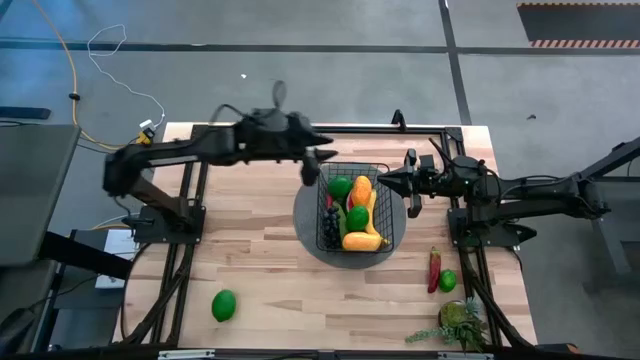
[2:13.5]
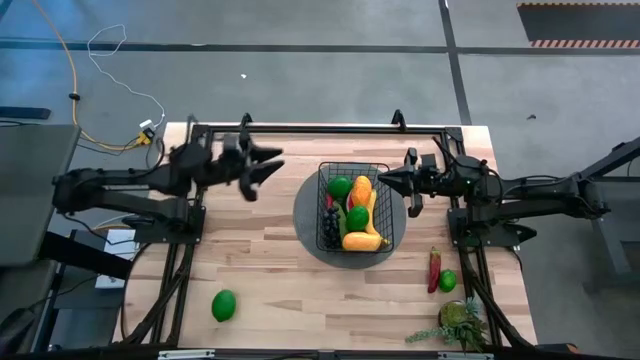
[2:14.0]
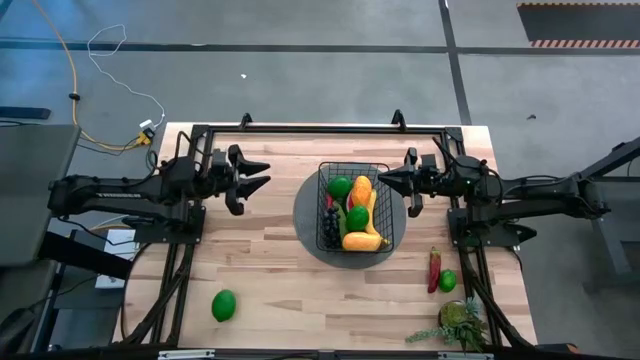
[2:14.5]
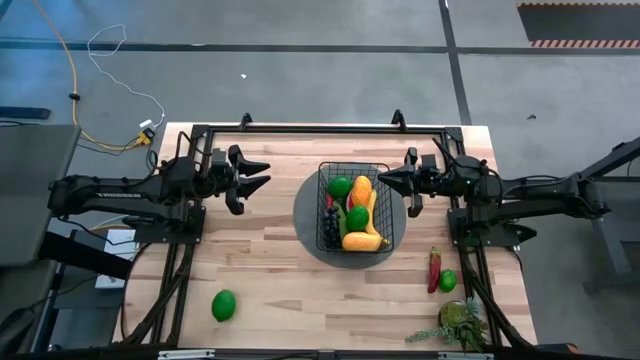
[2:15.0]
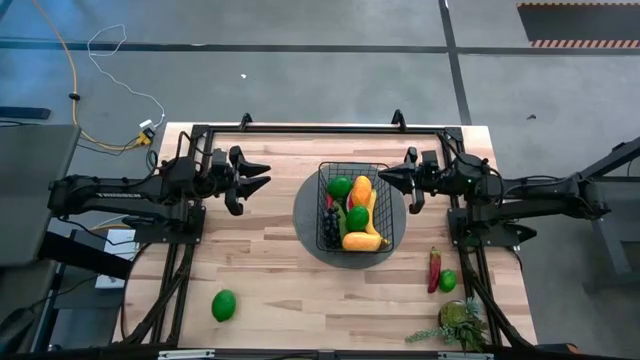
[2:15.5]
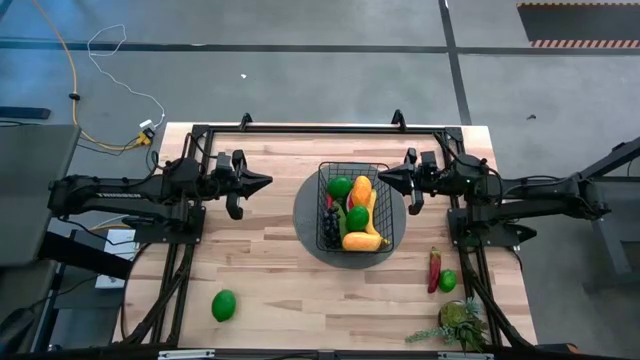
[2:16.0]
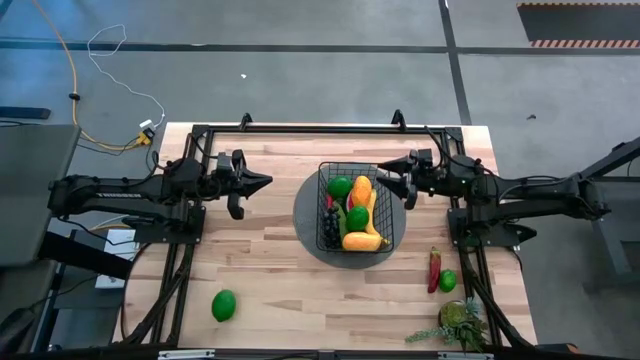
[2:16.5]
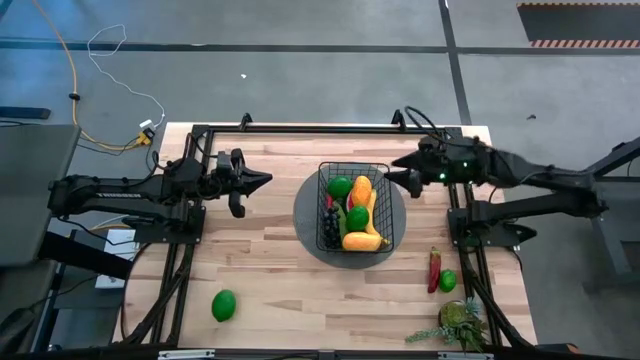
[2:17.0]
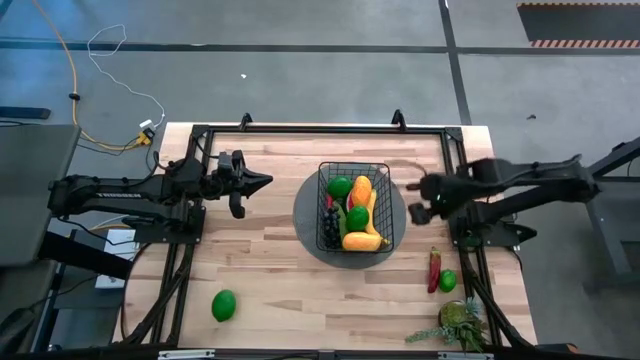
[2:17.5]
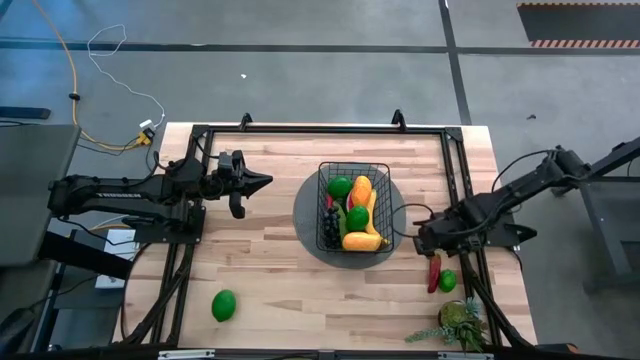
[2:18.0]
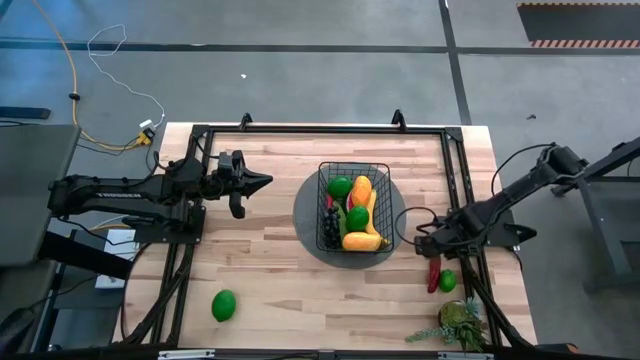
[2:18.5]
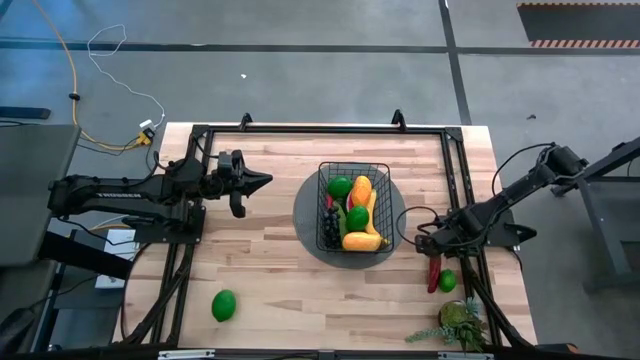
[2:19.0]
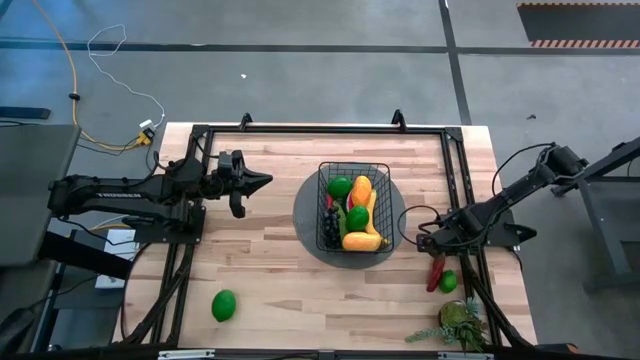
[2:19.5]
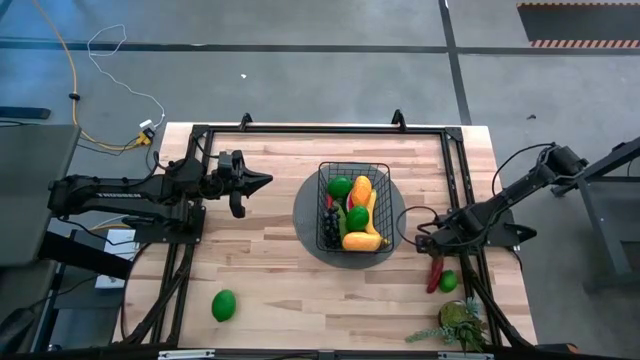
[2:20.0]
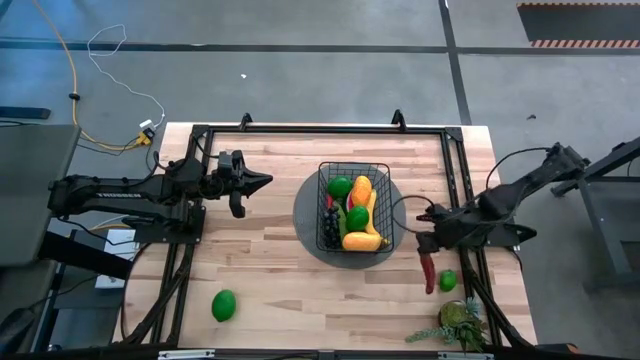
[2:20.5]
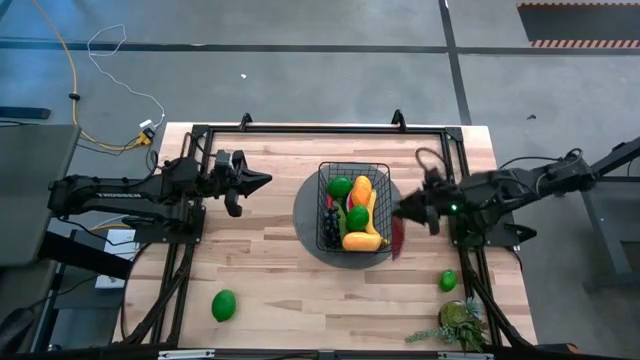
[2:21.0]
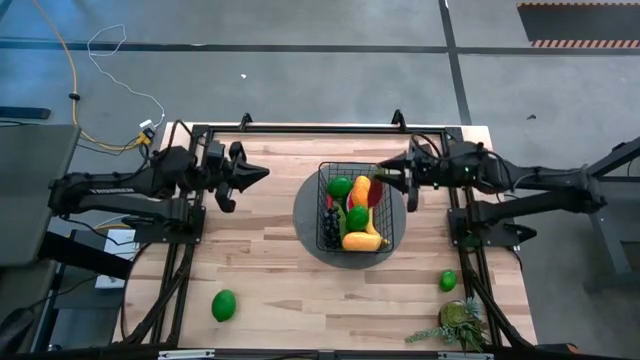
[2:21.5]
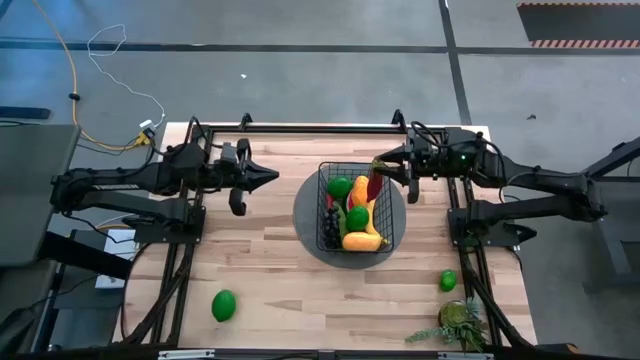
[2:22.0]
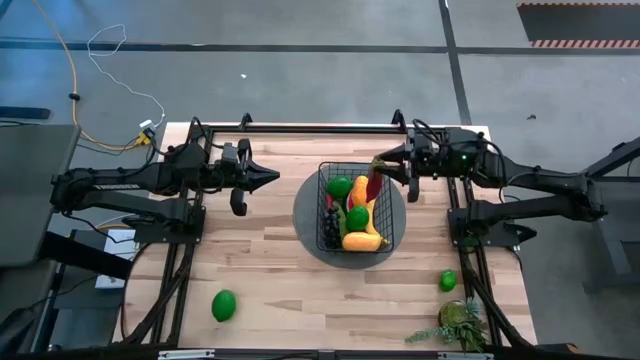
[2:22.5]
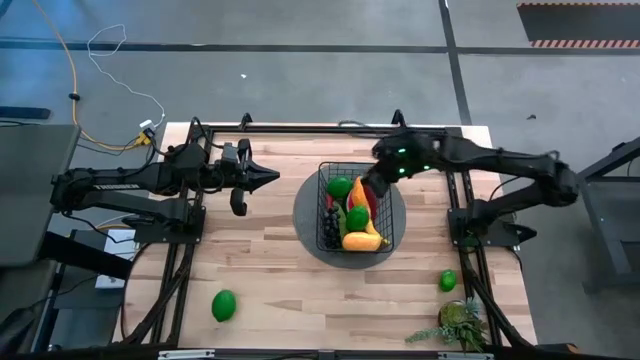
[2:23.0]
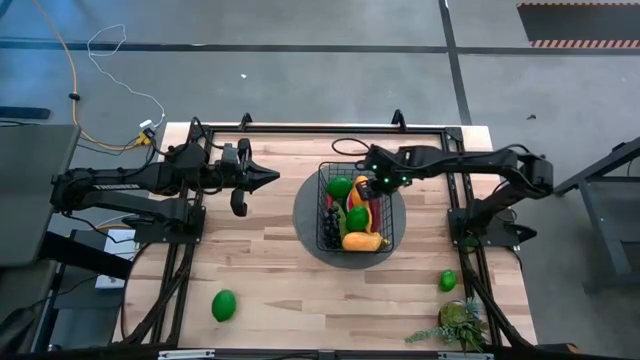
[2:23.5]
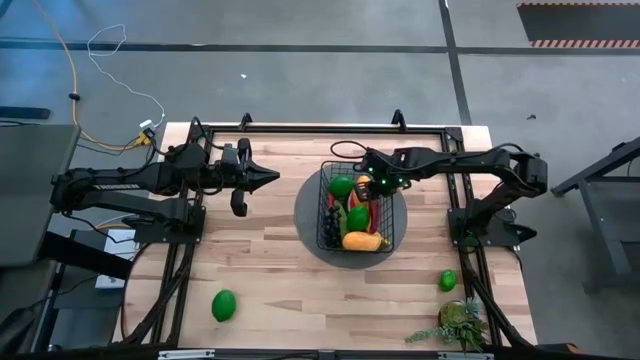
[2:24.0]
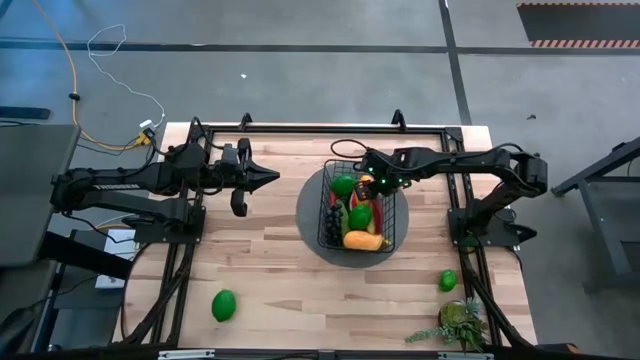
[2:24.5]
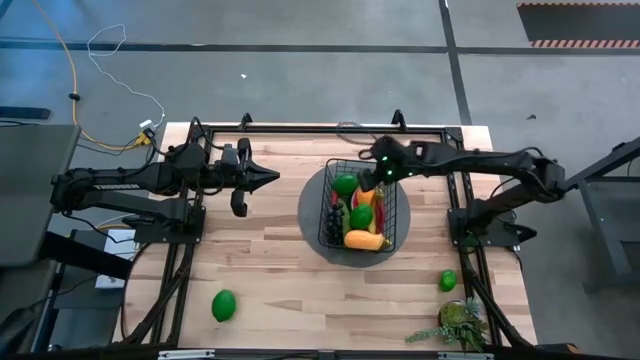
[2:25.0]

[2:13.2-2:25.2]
Task: Build produce basket
Put the red chili pepper into the black wire basket

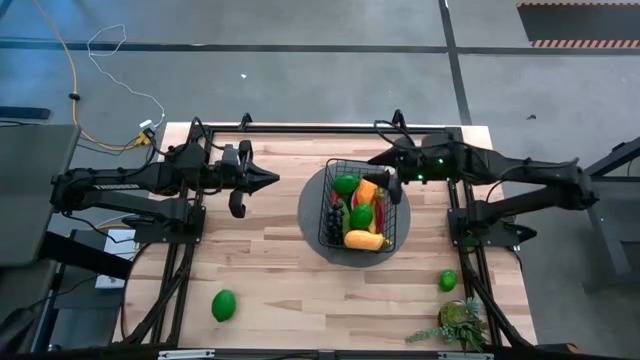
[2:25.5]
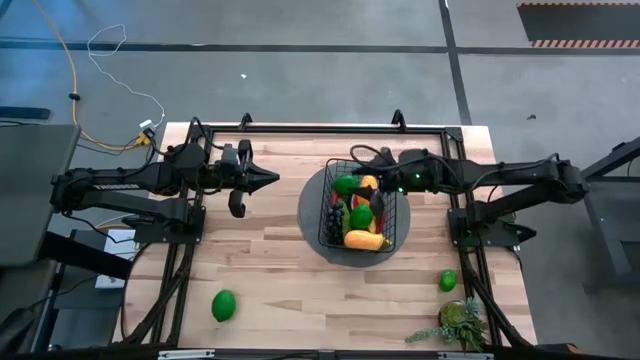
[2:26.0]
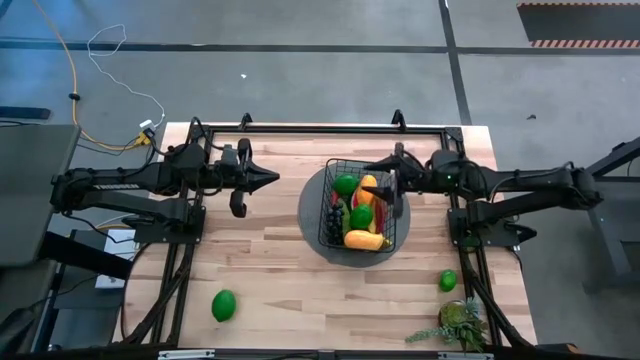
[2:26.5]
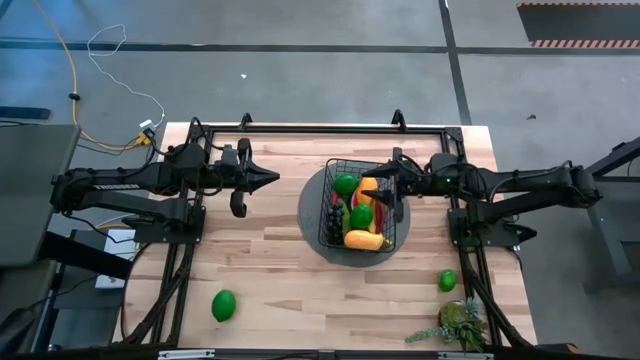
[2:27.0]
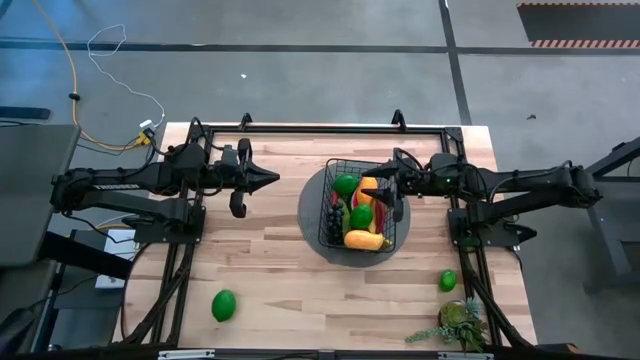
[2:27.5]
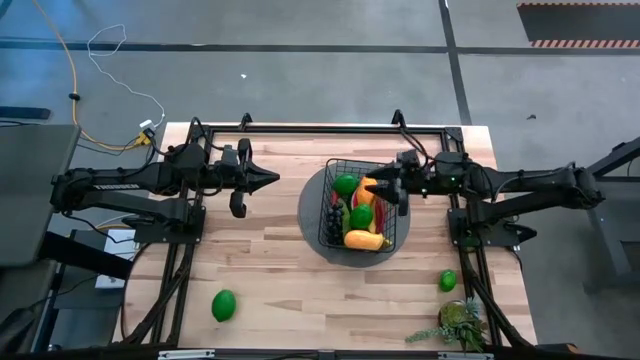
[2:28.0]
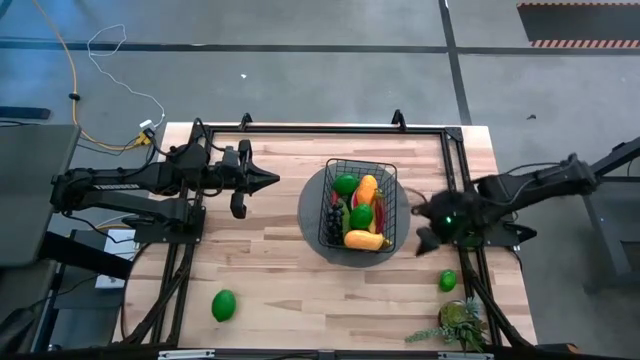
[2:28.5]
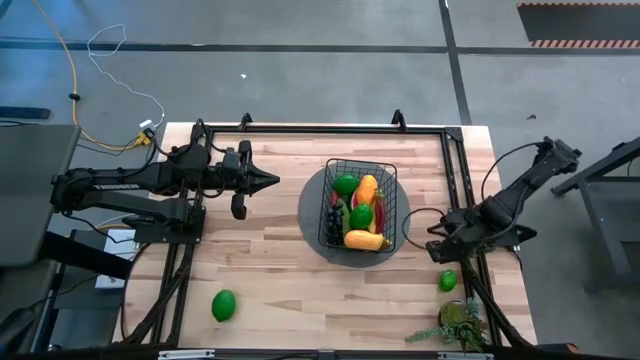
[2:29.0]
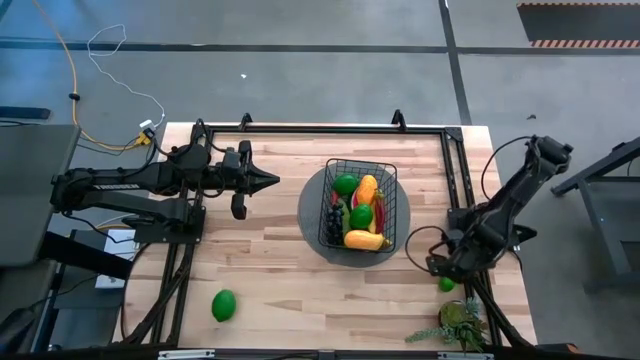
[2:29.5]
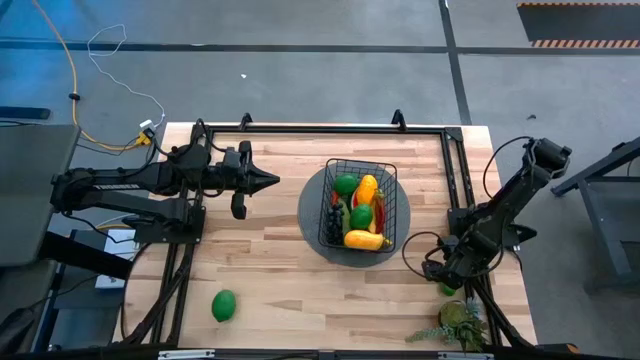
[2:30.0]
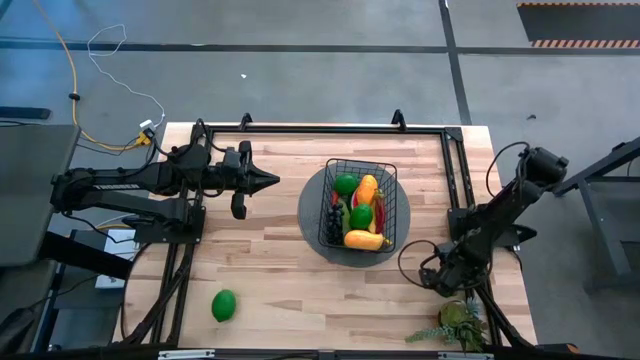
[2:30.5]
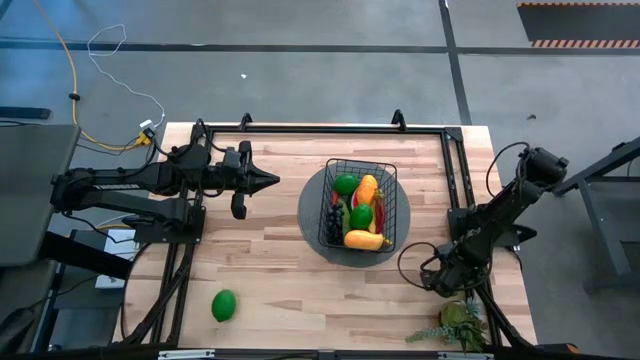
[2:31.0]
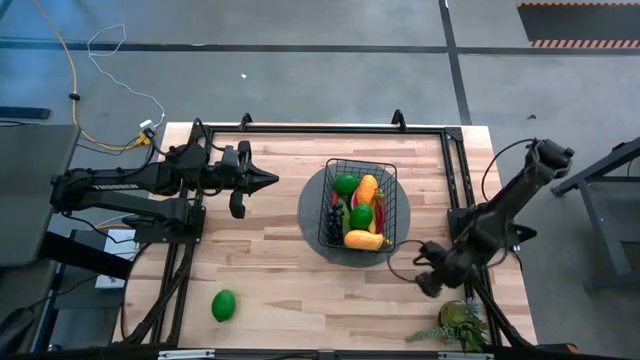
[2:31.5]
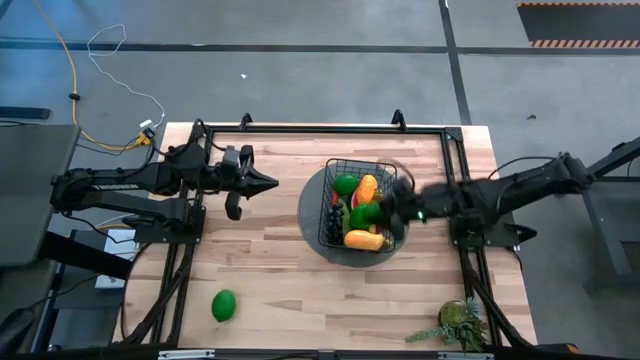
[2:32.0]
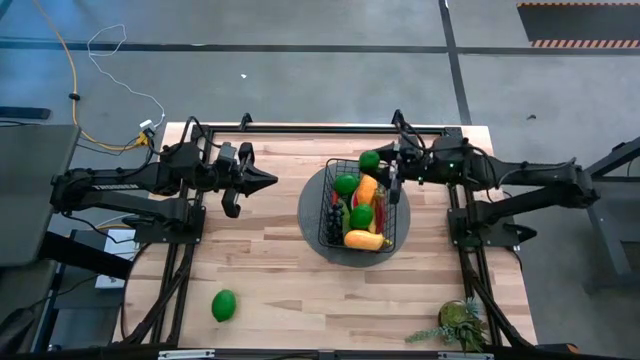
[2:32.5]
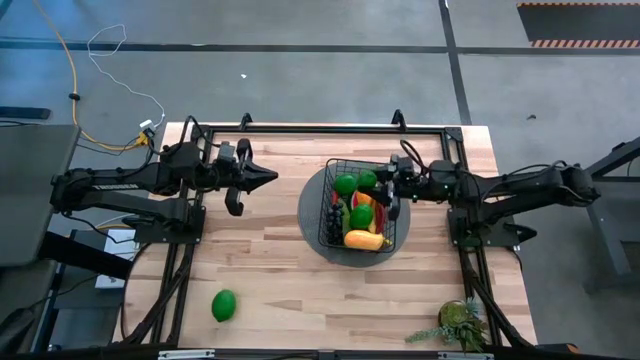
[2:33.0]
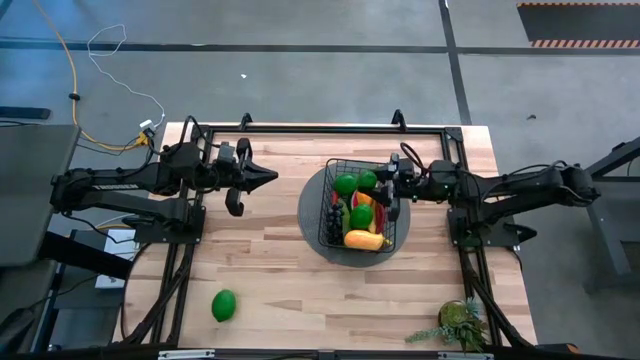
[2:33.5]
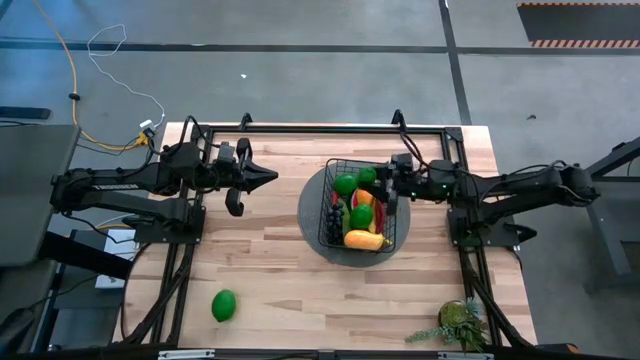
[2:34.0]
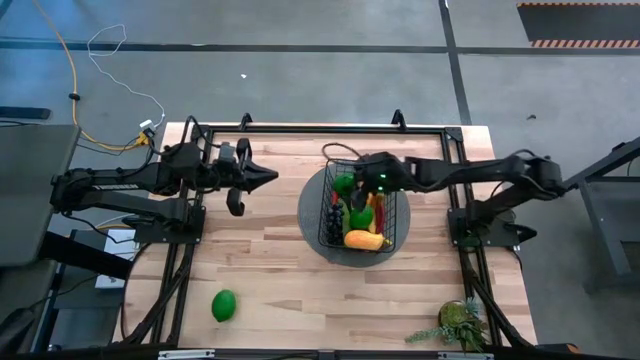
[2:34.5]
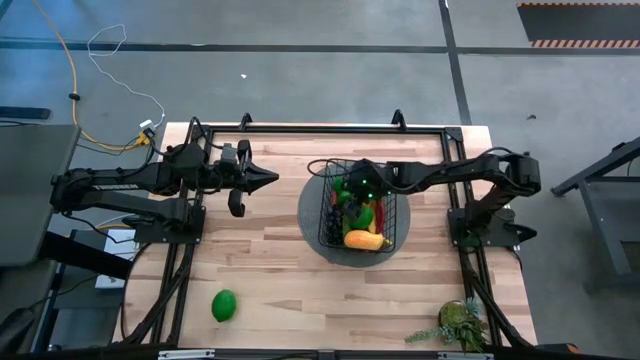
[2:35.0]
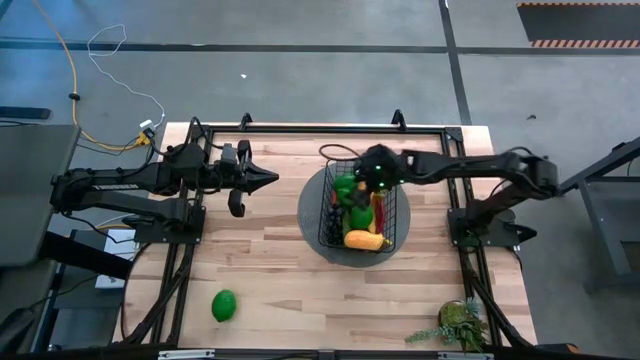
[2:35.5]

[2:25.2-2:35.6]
Put the green lime into the black wire basket
